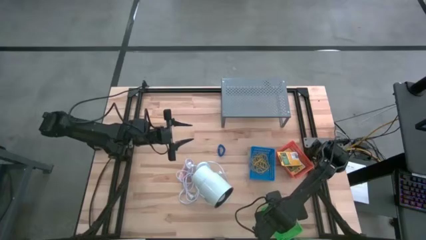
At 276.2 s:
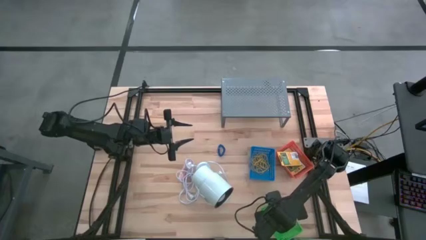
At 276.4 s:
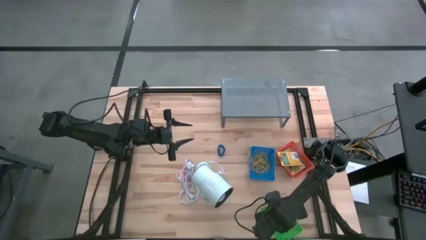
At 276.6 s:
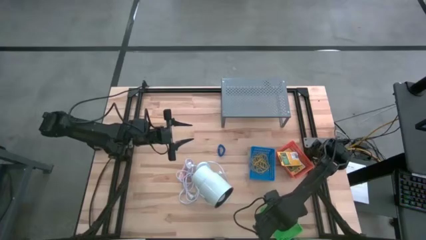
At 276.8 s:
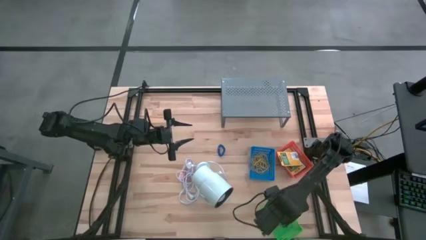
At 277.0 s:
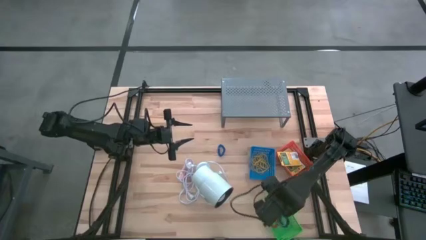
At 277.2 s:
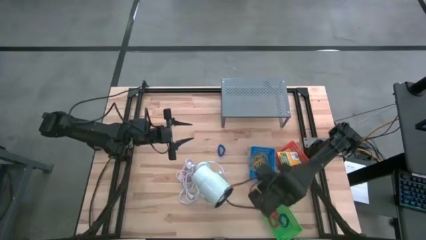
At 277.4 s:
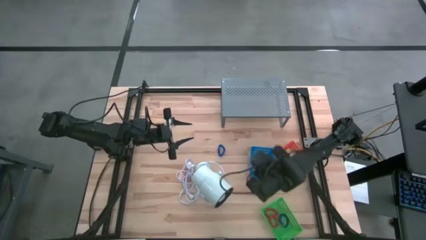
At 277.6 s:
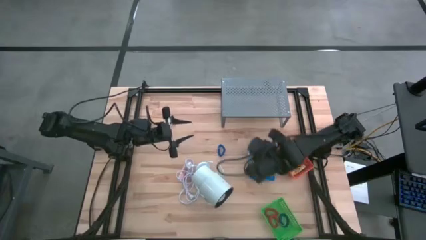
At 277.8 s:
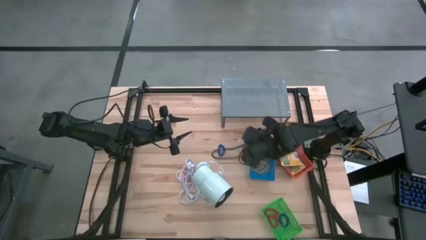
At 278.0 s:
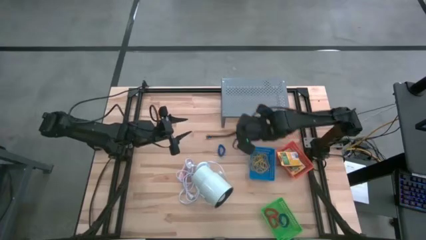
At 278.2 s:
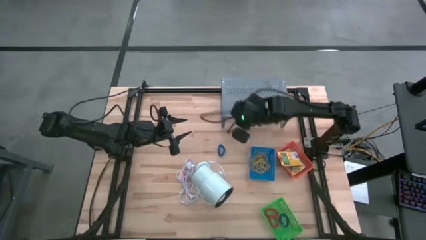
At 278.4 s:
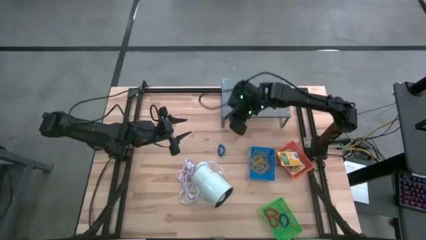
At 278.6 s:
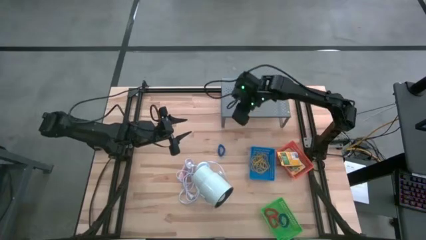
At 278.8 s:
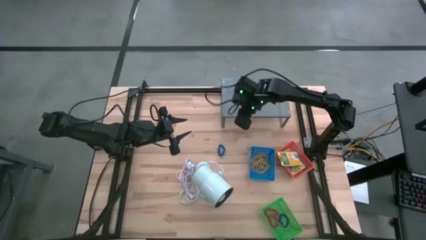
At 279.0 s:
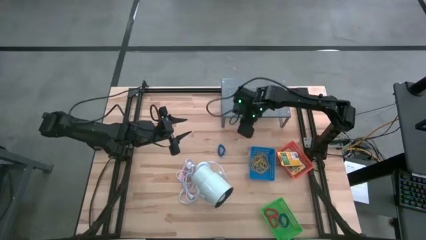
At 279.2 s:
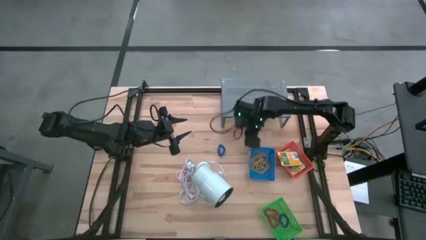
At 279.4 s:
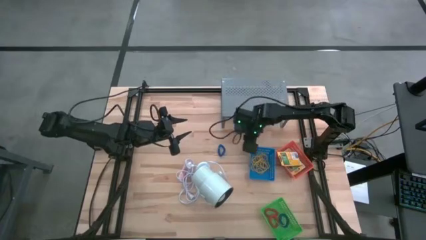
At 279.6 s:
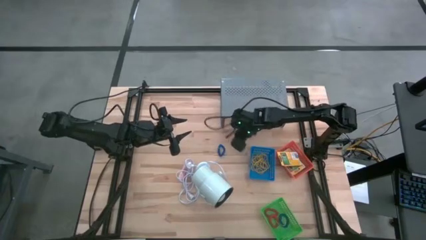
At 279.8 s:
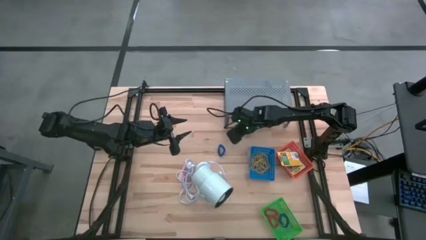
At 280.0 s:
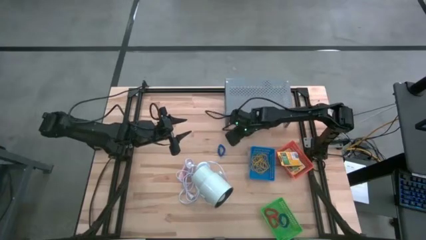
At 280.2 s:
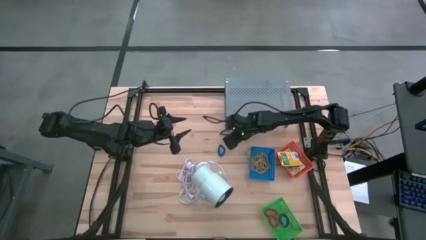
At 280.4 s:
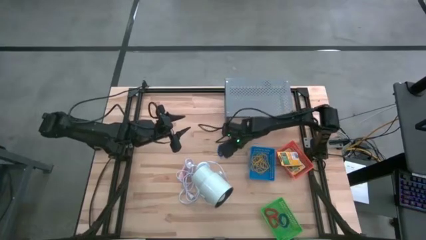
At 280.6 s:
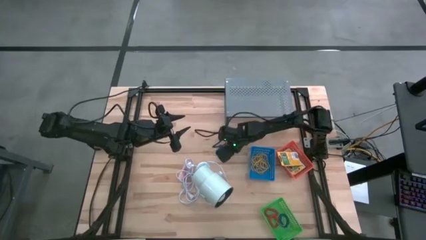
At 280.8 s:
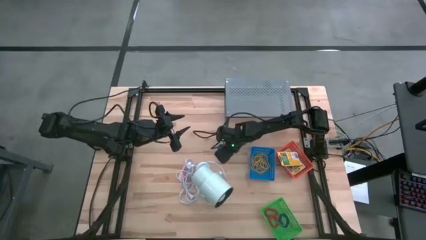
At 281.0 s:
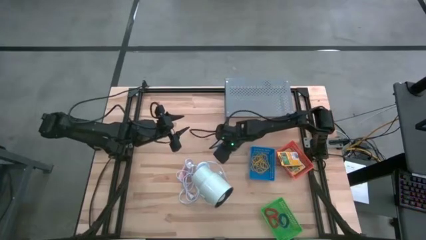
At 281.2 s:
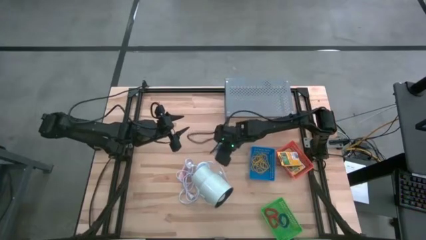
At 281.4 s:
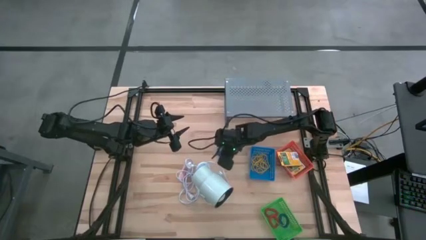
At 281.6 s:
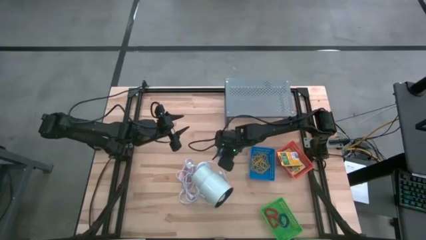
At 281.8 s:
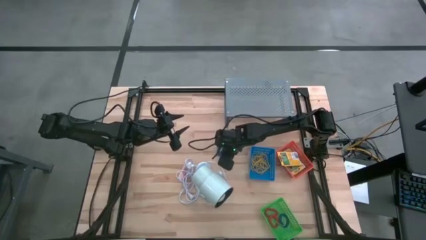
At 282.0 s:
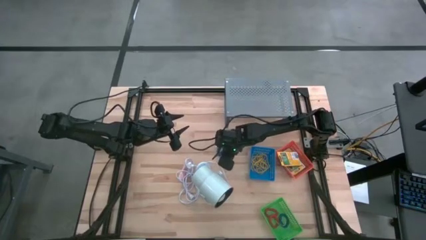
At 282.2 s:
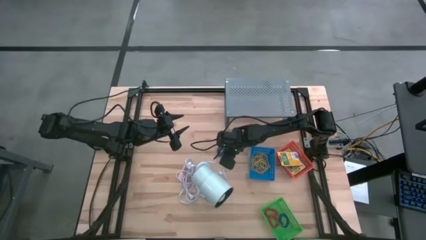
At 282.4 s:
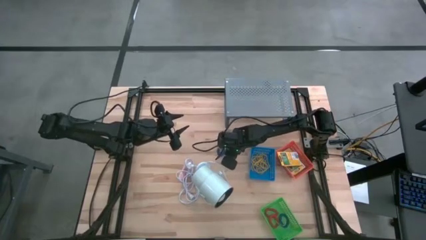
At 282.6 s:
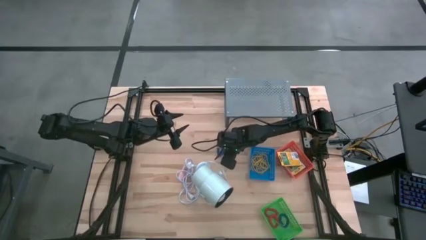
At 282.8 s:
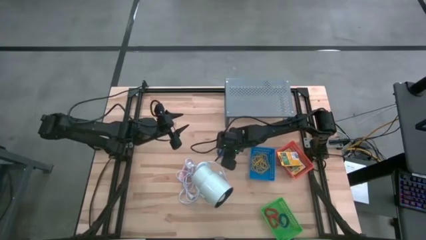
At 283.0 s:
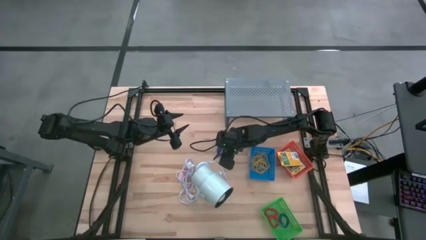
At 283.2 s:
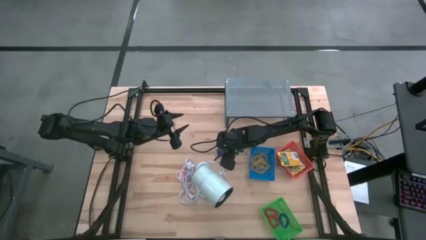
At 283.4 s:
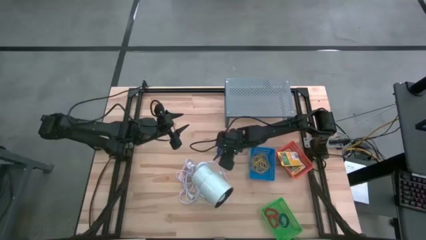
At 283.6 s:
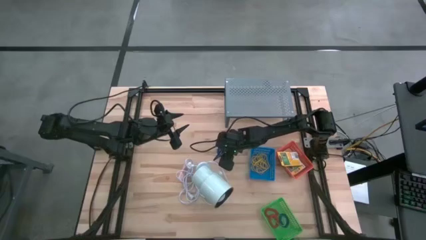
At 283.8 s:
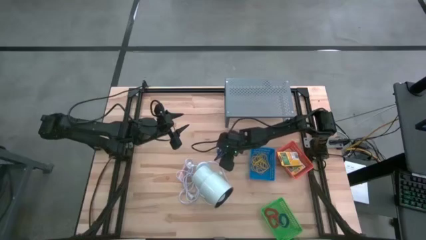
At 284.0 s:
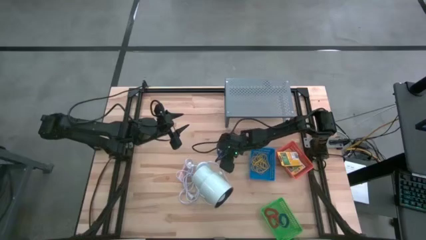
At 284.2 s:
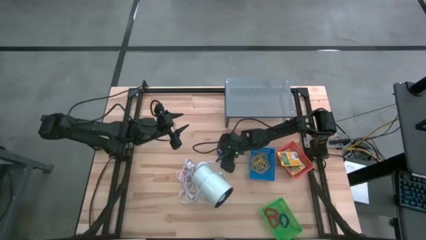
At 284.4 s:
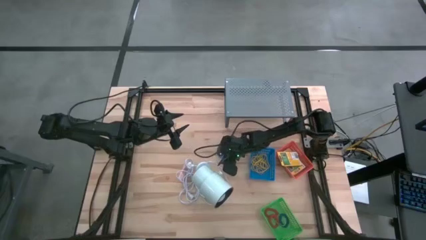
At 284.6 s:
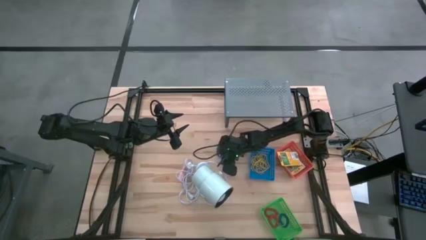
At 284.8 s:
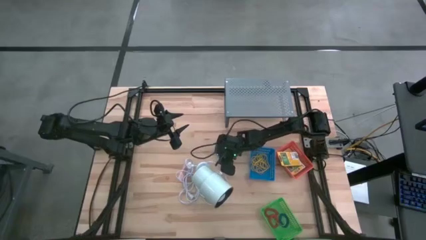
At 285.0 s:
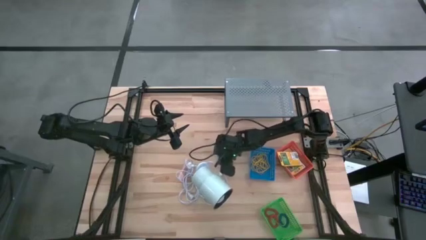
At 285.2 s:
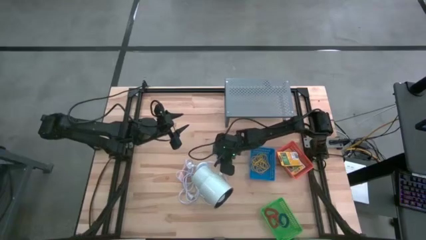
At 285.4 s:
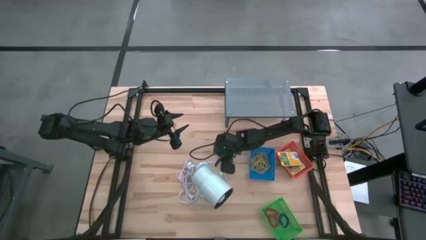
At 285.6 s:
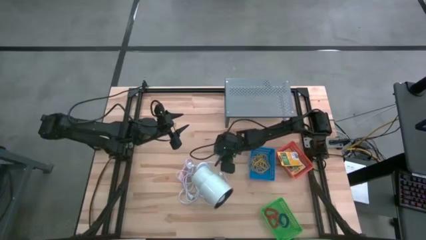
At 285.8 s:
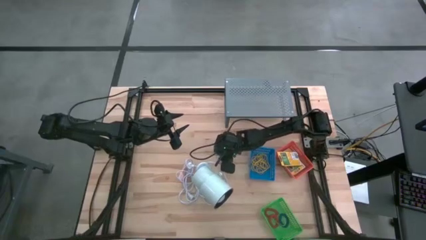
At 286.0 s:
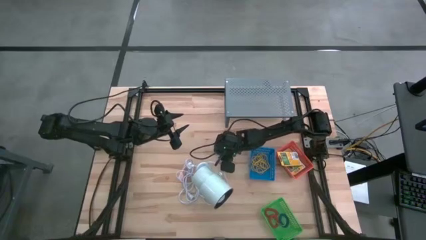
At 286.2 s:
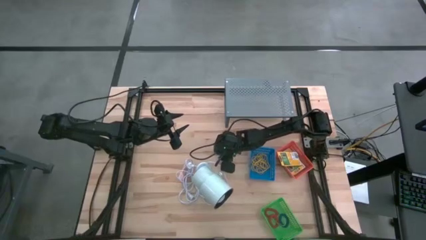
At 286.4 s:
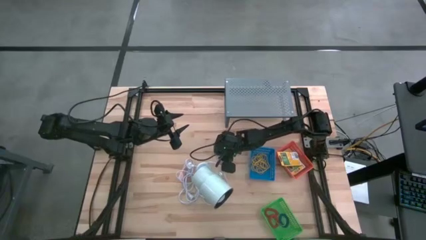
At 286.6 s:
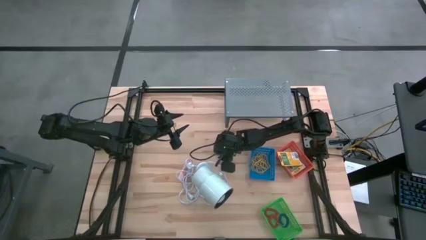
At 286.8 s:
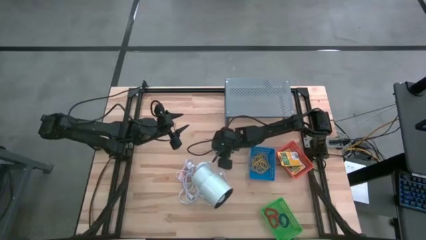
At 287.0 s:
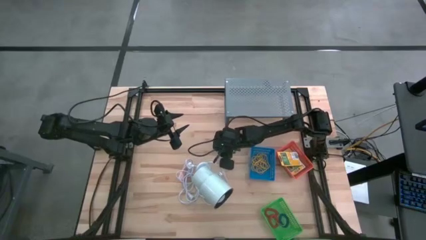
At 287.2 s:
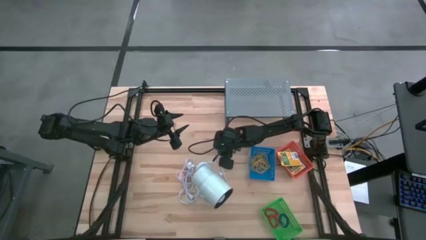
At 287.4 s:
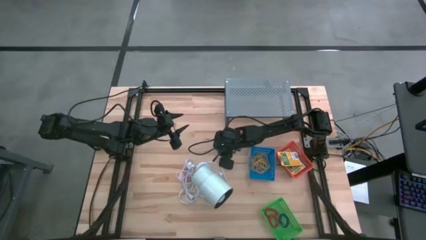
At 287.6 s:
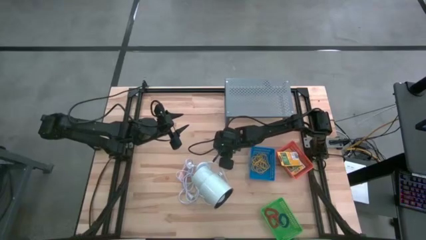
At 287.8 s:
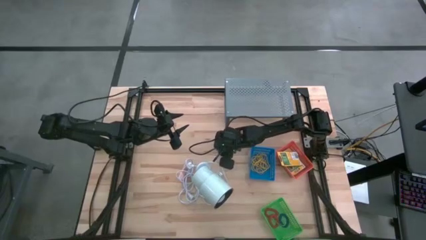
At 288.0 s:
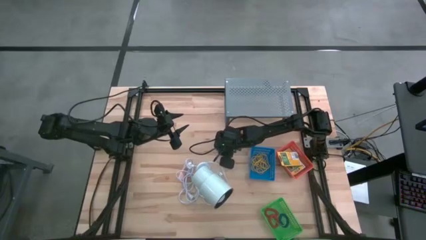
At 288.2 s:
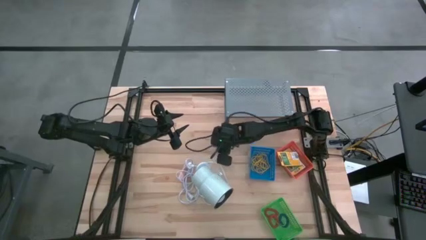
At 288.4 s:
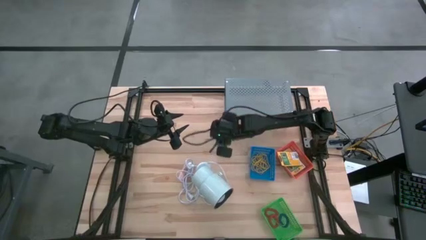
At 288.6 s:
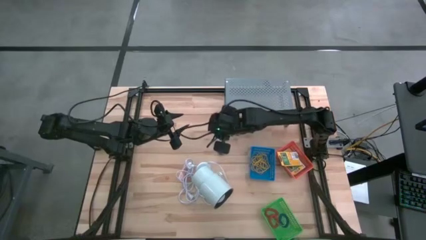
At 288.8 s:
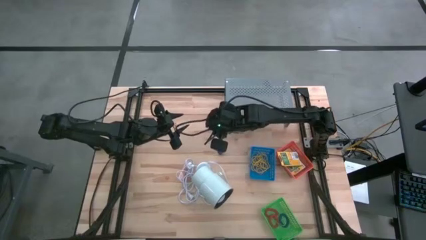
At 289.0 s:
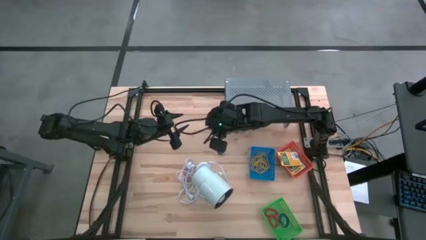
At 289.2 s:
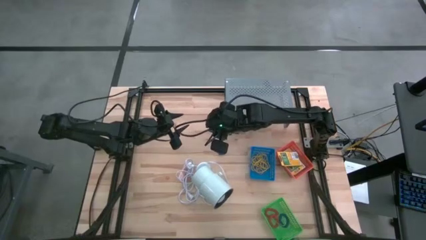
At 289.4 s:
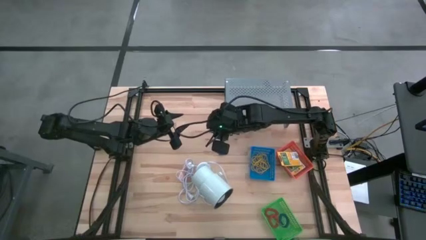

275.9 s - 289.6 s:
Task: Pick & Place Office Desk Supplies
Put the blue spring keychain into the green bin
